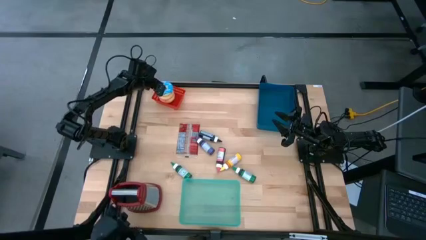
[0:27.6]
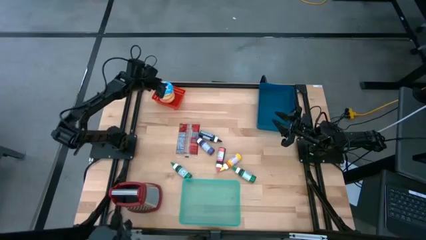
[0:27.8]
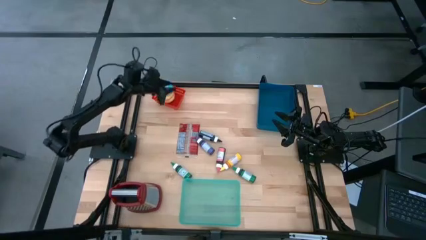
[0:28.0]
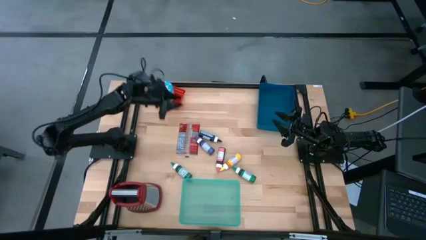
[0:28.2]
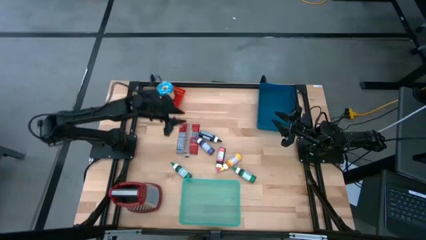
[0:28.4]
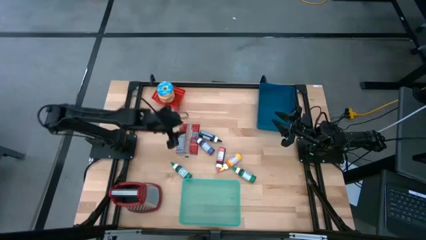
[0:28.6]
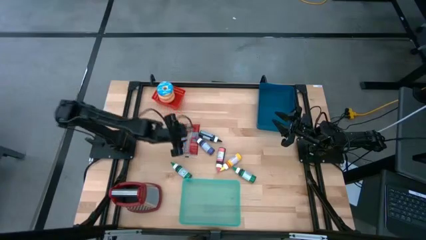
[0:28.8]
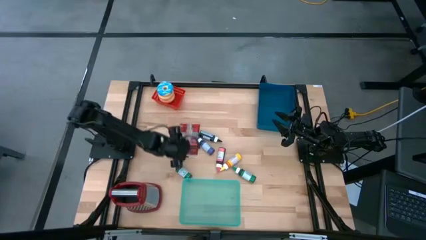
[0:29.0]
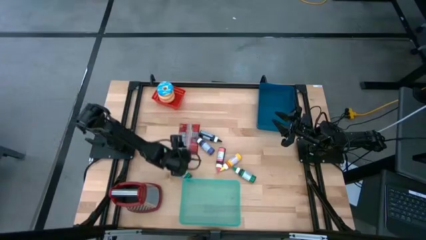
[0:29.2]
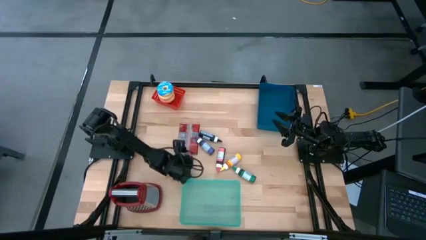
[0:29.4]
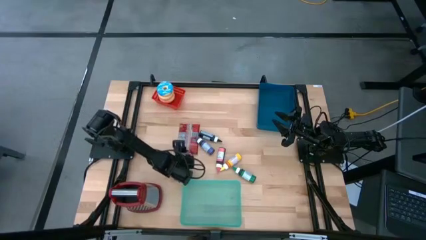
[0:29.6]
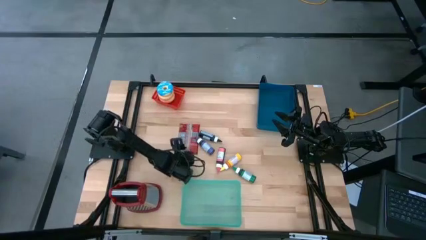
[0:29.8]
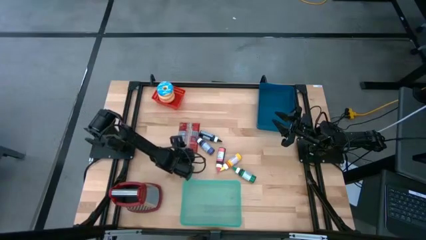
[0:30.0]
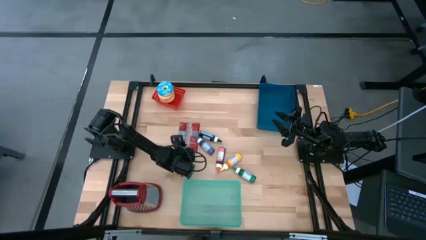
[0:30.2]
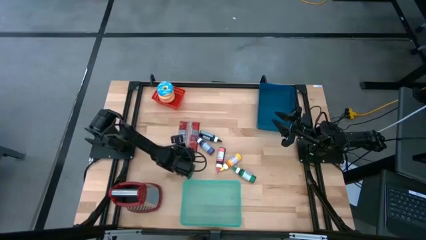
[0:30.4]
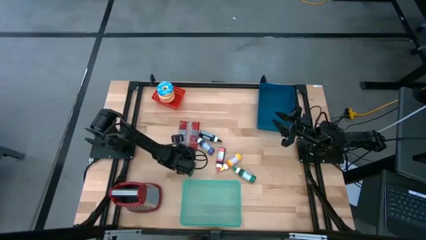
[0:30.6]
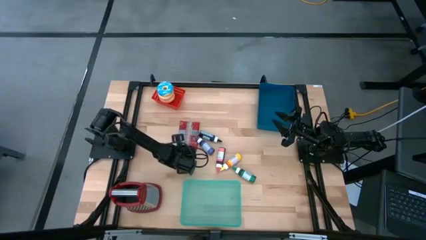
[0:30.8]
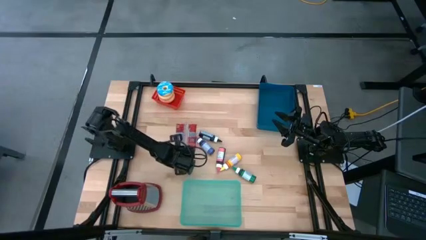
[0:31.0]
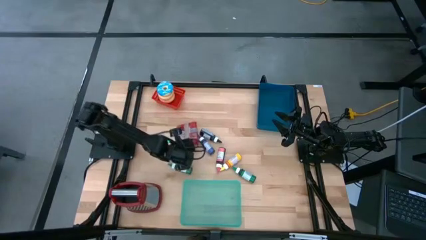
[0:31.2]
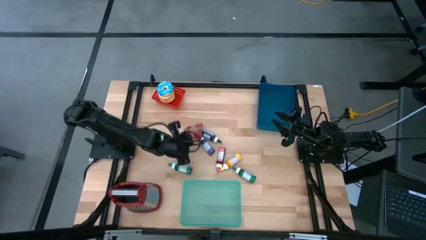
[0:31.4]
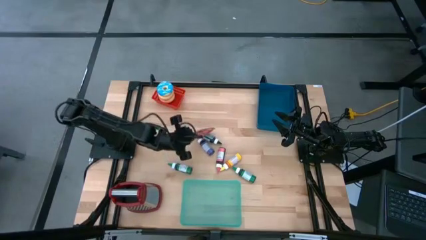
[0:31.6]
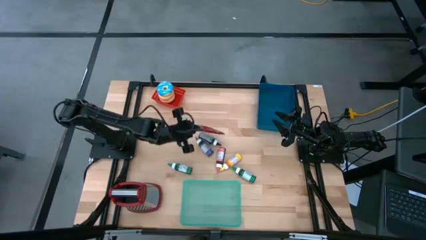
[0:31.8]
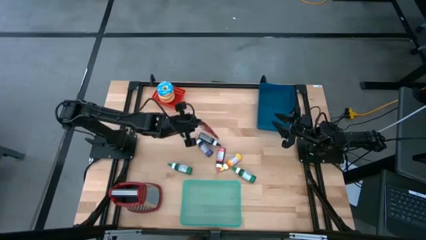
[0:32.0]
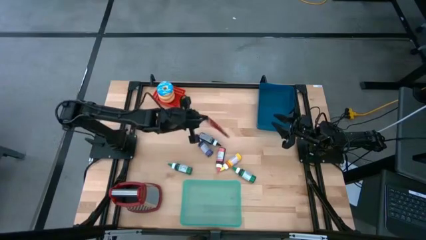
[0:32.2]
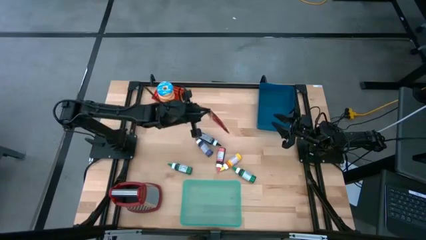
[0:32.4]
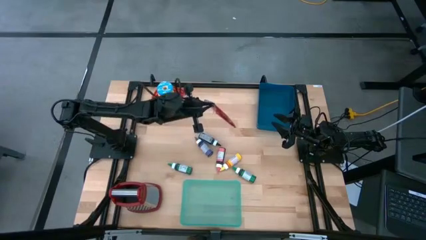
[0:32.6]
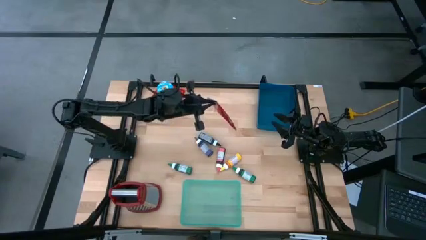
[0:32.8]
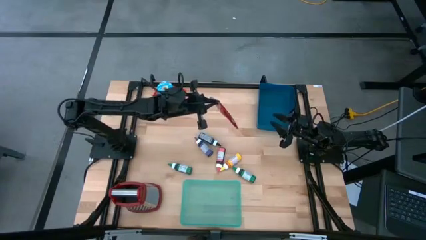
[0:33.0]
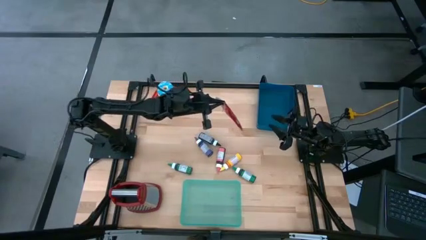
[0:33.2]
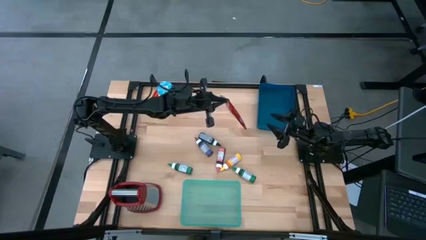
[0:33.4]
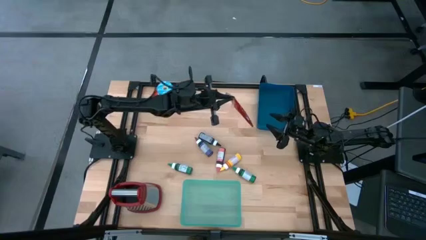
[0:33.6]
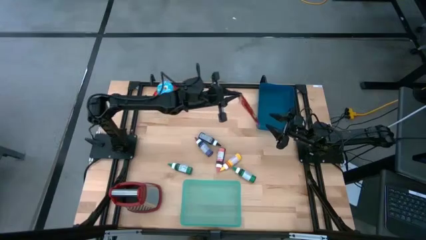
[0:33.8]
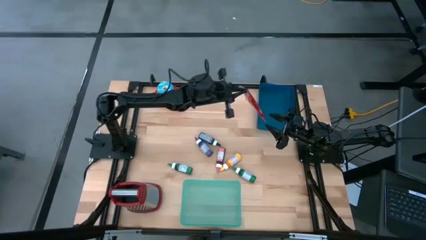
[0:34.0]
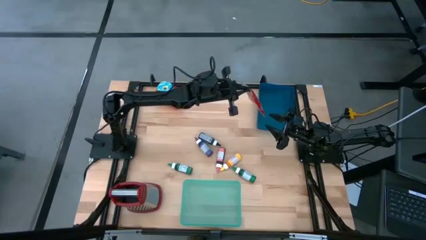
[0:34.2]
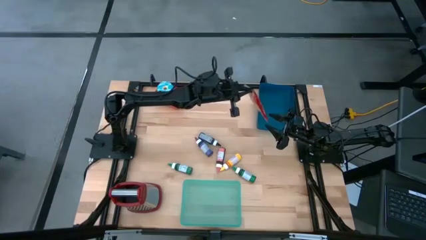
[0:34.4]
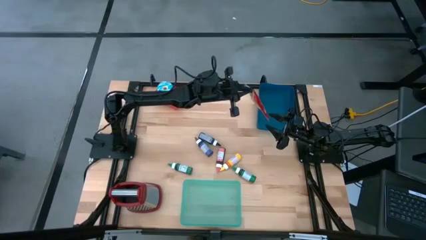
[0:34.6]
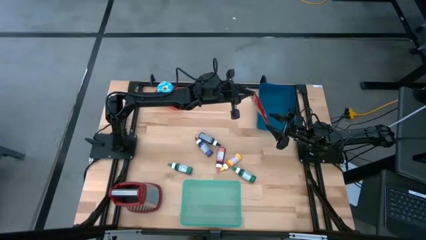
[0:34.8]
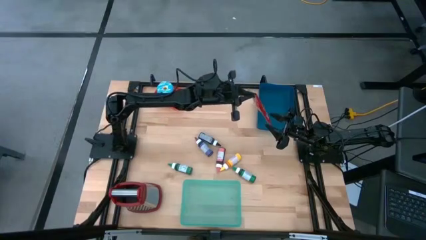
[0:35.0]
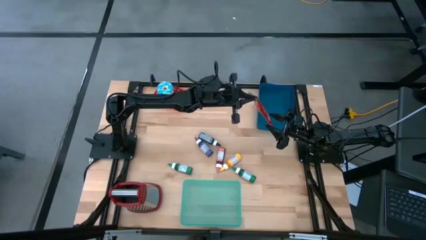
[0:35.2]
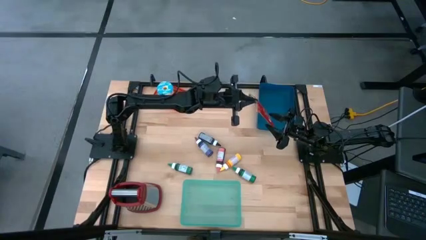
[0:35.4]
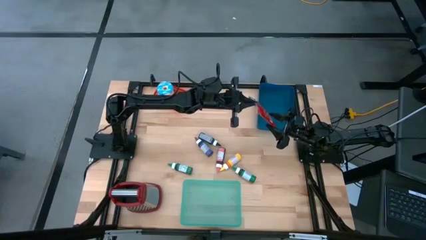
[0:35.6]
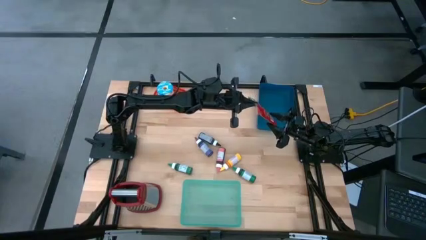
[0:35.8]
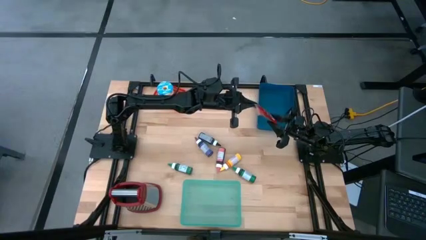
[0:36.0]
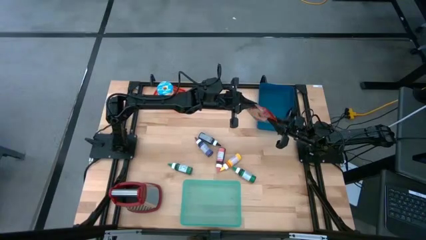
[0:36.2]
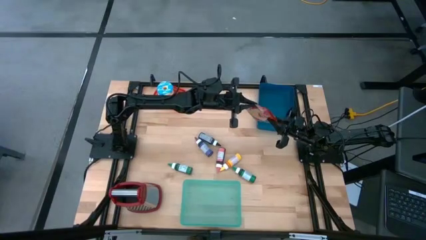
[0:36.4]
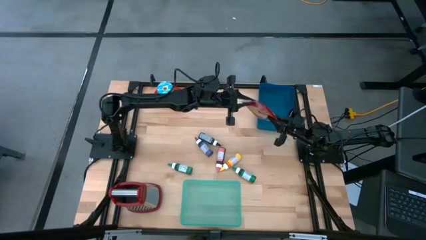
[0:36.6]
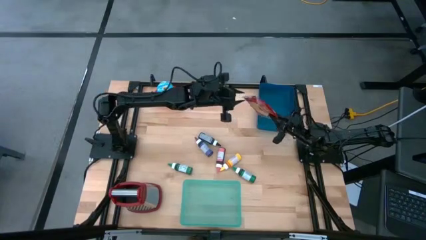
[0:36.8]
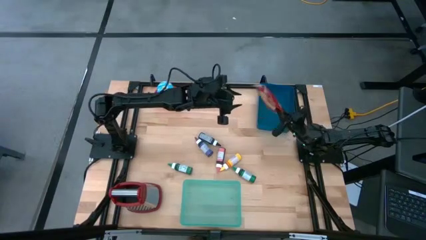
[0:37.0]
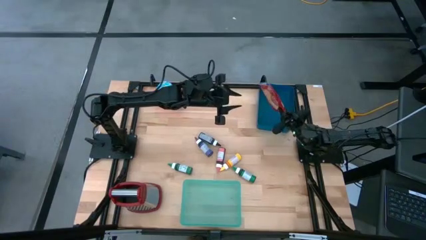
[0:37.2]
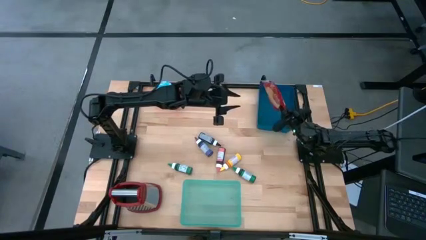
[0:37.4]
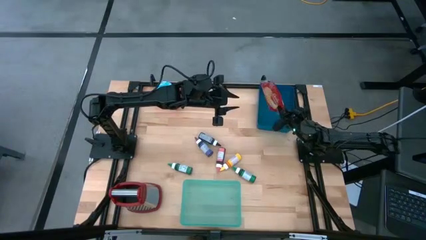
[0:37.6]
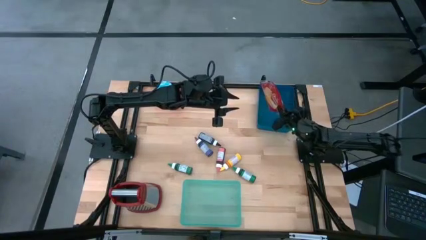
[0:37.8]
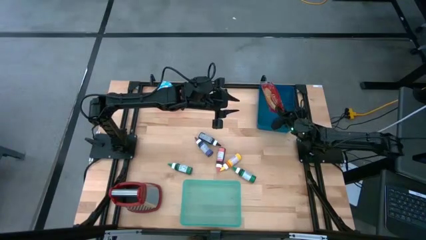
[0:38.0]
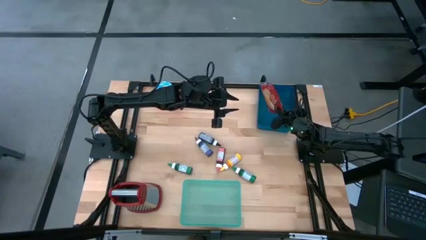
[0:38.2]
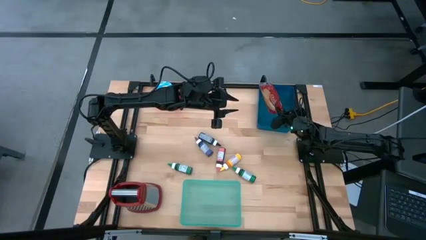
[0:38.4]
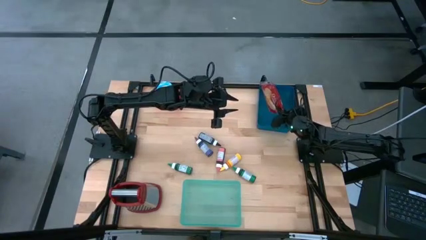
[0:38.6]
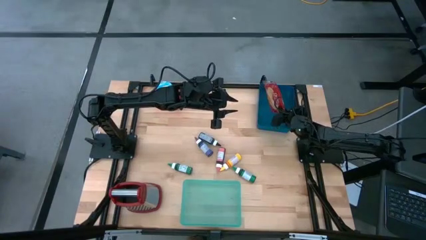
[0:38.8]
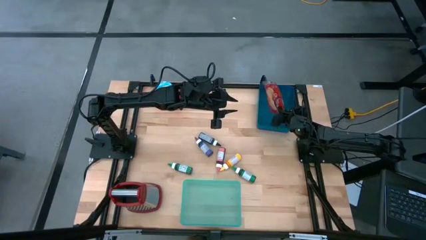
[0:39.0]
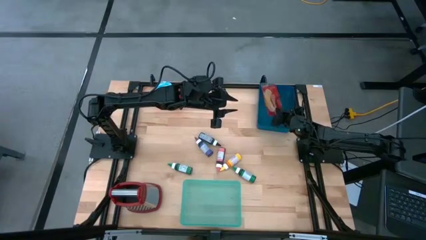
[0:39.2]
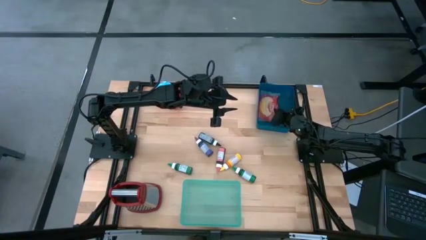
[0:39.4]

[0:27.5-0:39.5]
Put the red popcorn bag into the blue bin

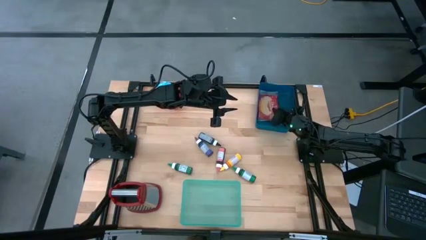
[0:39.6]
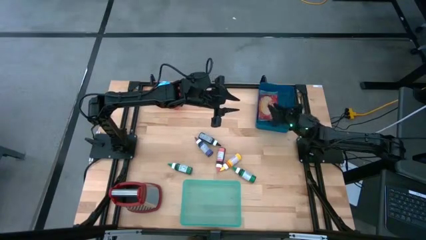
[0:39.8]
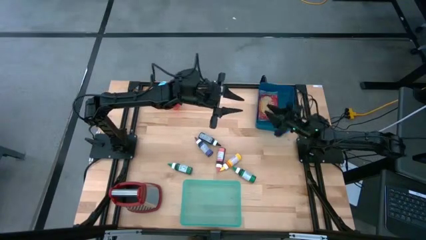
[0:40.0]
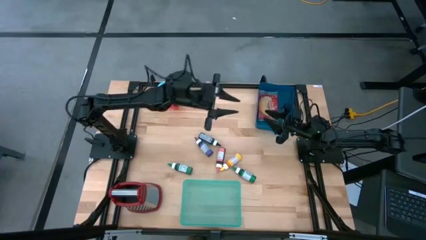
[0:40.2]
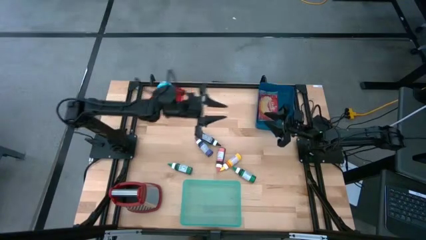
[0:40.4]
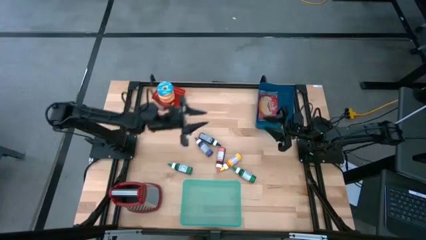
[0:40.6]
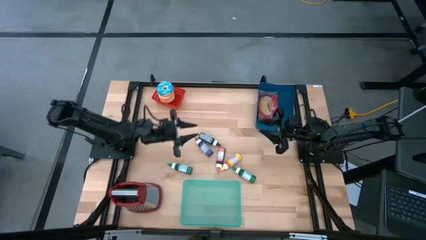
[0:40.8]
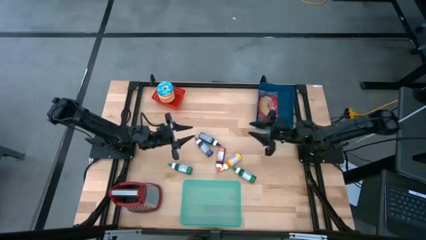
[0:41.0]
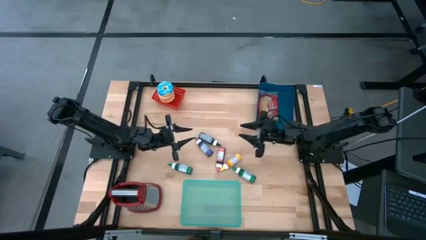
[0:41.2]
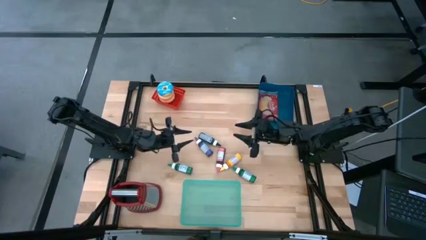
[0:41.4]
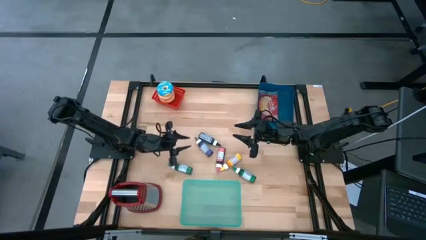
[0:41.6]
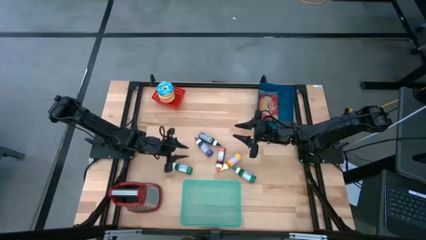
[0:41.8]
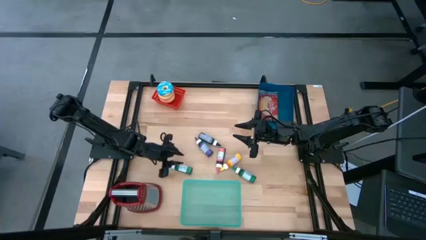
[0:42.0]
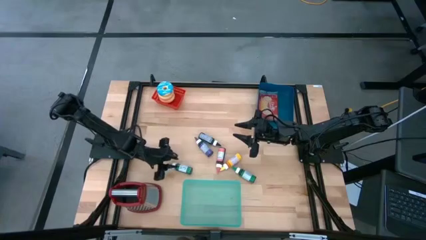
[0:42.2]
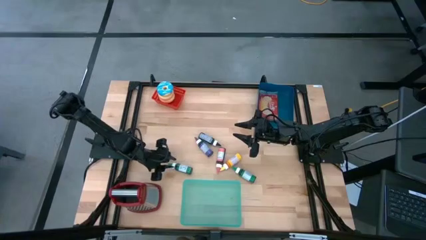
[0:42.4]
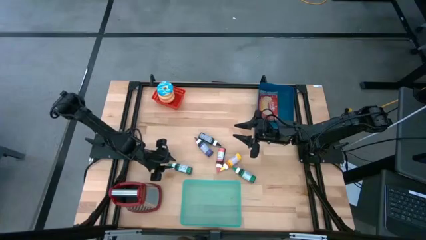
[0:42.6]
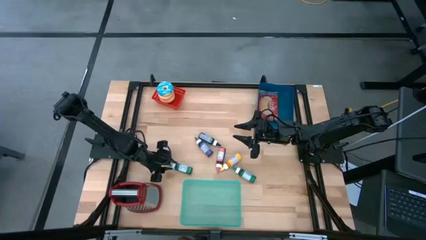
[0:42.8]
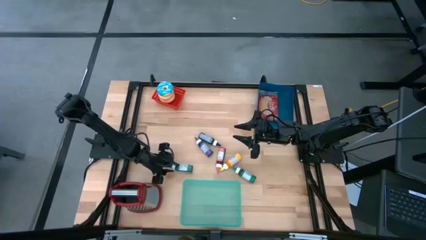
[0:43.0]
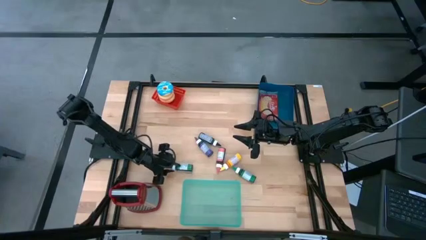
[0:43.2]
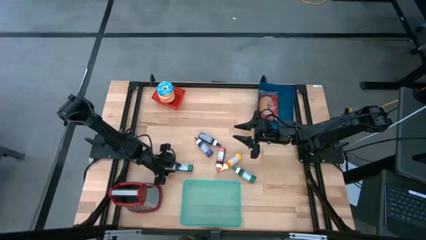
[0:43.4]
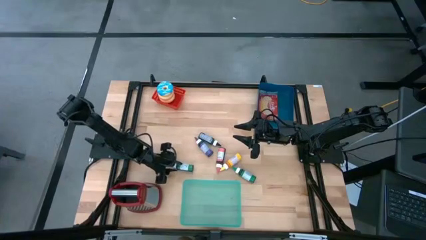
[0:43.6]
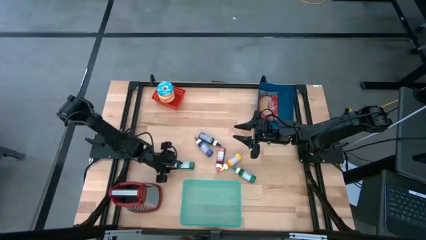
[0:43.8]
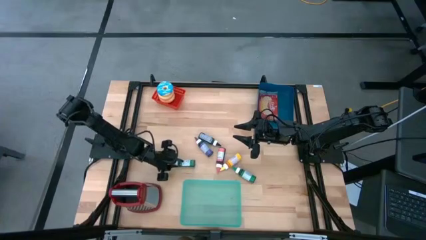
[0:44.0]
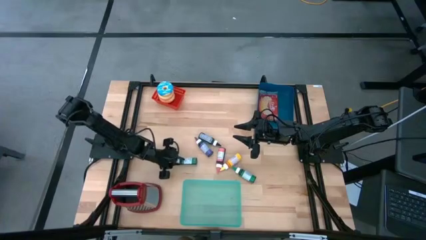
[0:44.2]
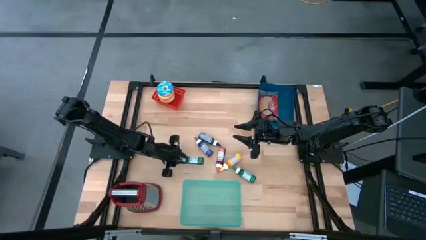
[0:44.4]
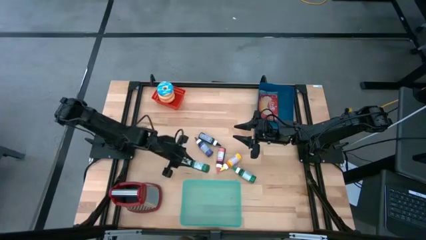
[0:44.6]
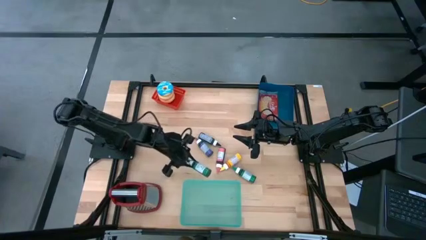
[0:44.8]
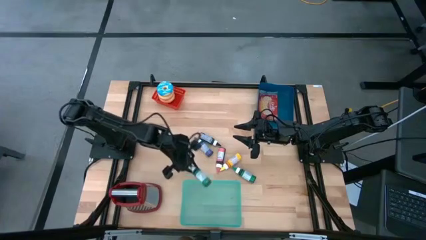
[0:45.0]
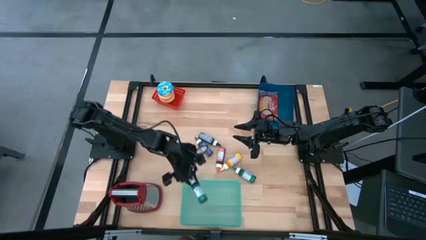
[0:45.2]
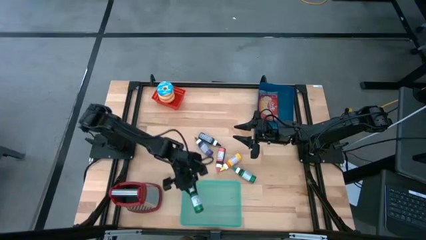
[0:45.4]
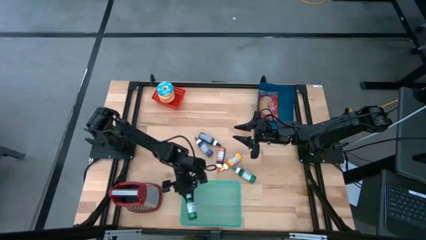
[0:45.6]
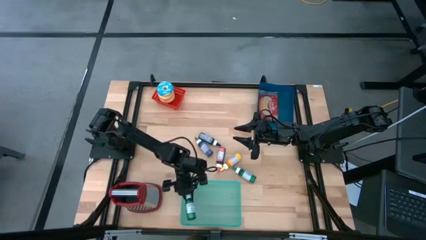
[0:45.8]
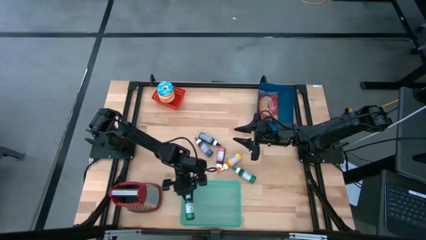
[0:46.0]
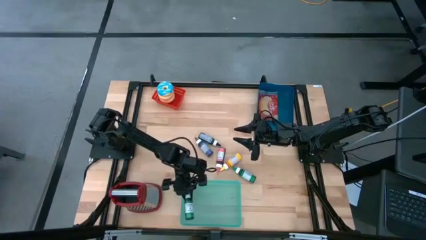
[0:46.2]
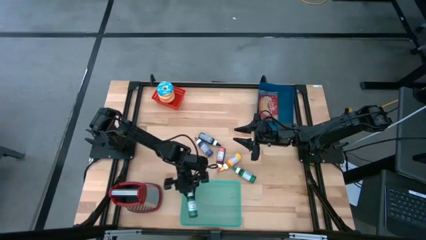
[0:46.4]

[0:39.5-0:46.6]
Put the left green food coloring bottle into the green bin
